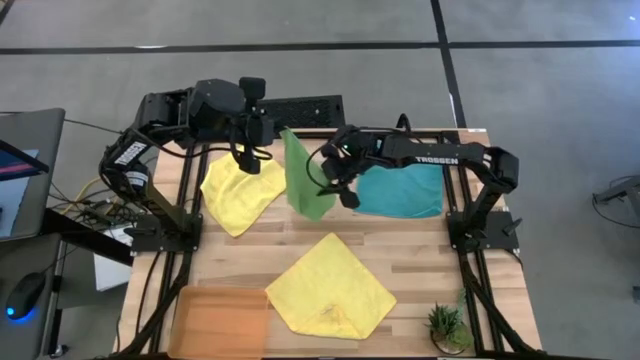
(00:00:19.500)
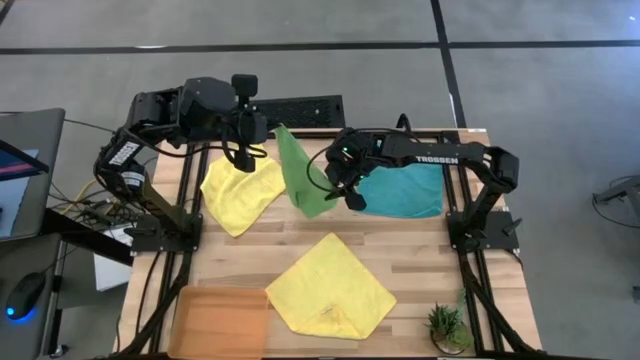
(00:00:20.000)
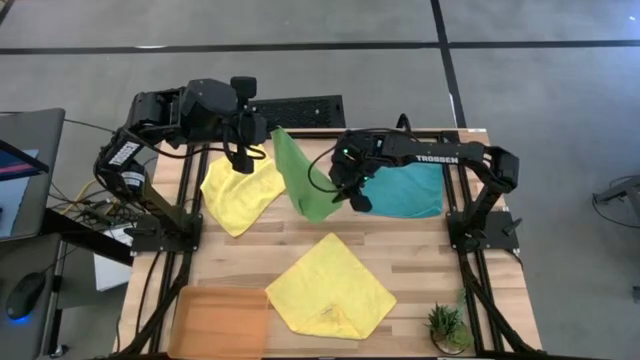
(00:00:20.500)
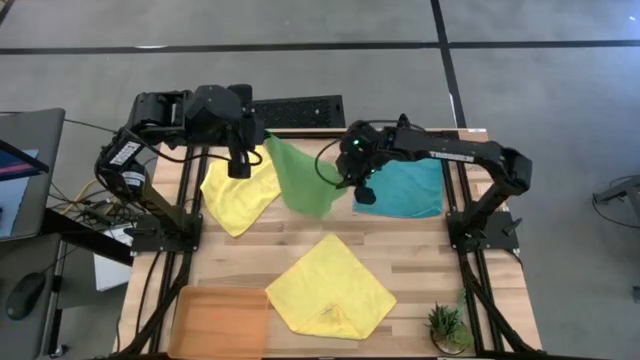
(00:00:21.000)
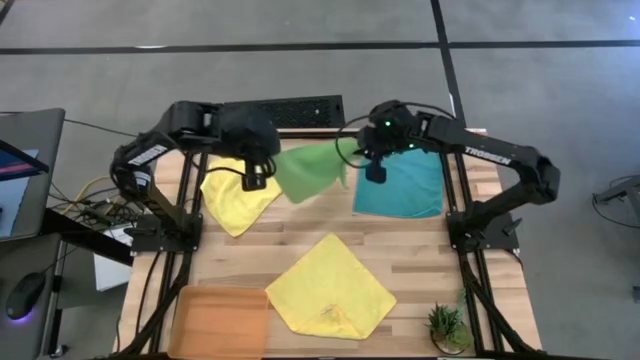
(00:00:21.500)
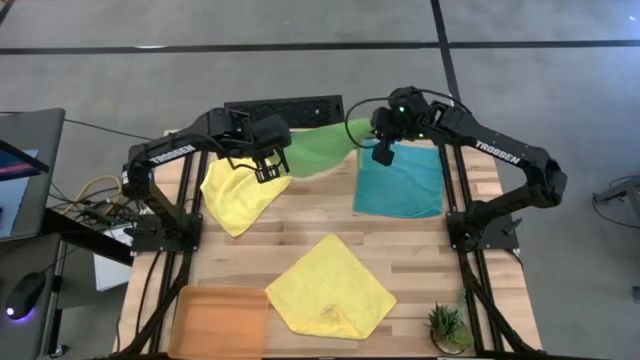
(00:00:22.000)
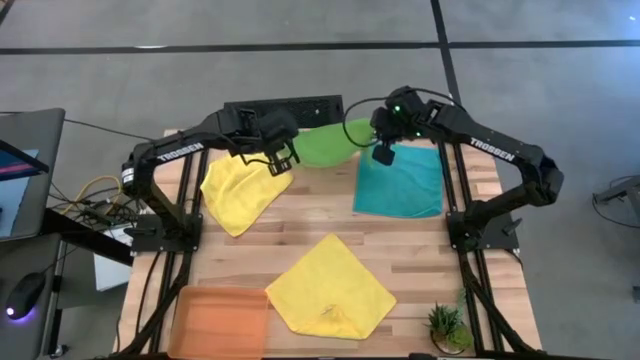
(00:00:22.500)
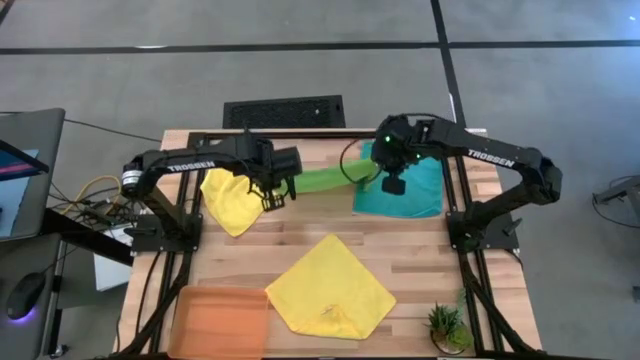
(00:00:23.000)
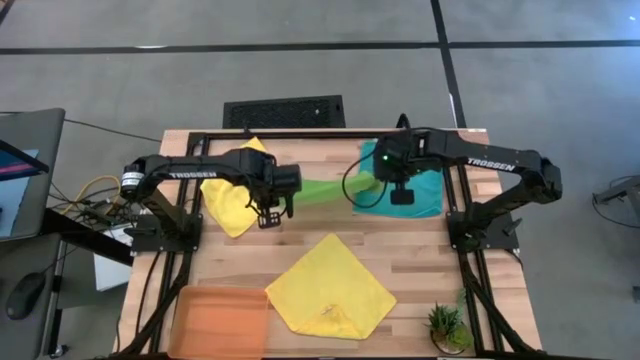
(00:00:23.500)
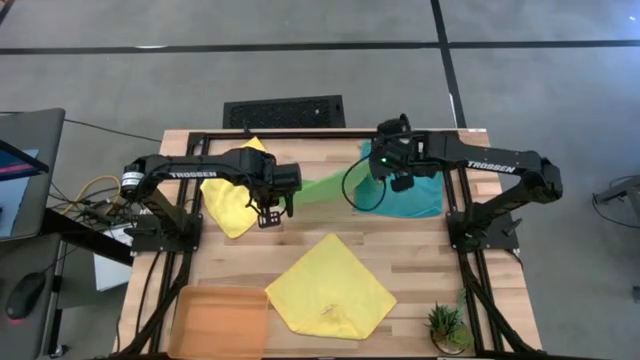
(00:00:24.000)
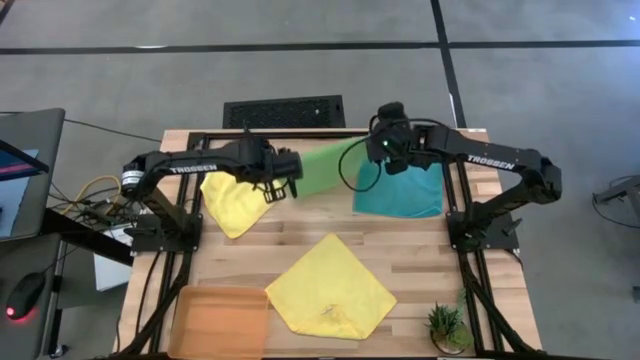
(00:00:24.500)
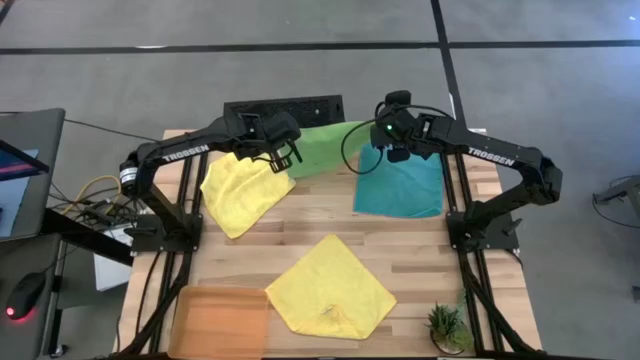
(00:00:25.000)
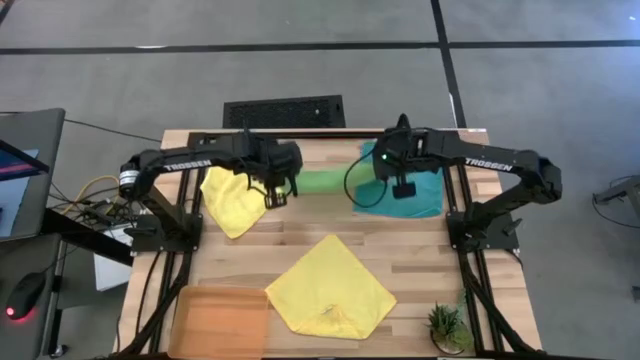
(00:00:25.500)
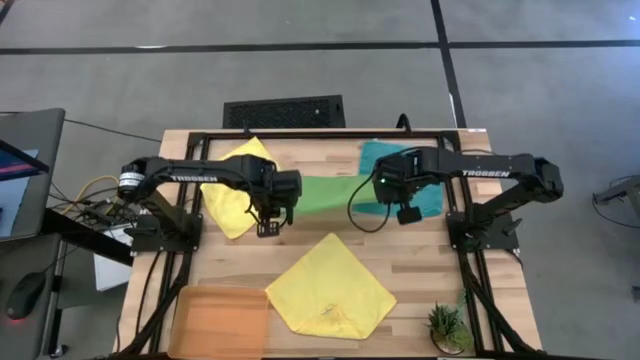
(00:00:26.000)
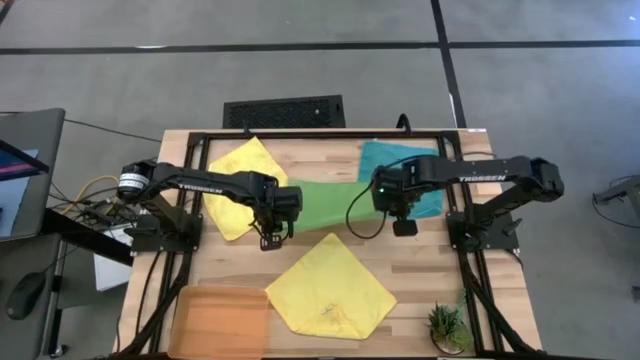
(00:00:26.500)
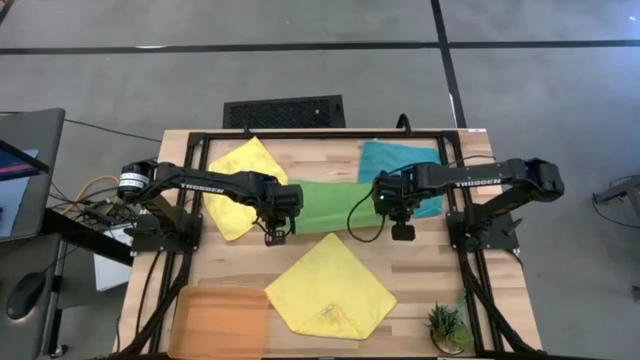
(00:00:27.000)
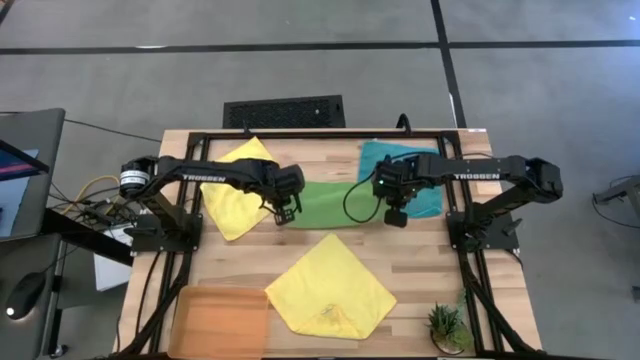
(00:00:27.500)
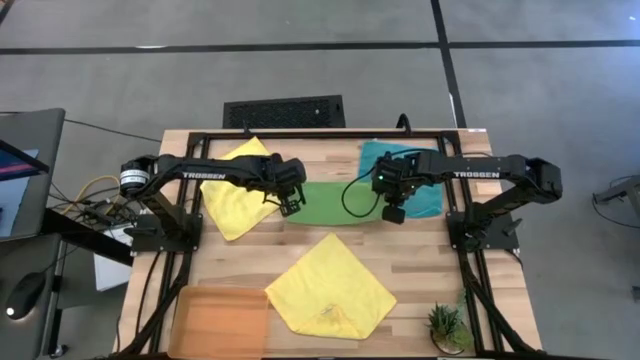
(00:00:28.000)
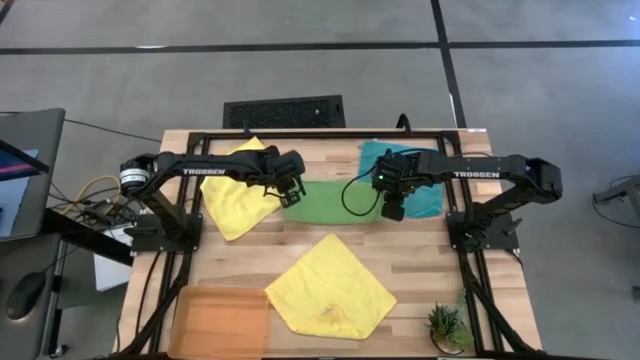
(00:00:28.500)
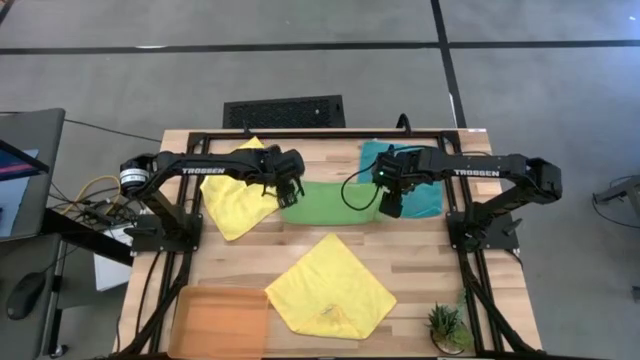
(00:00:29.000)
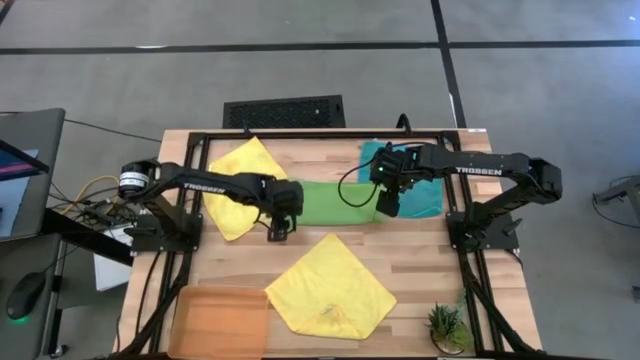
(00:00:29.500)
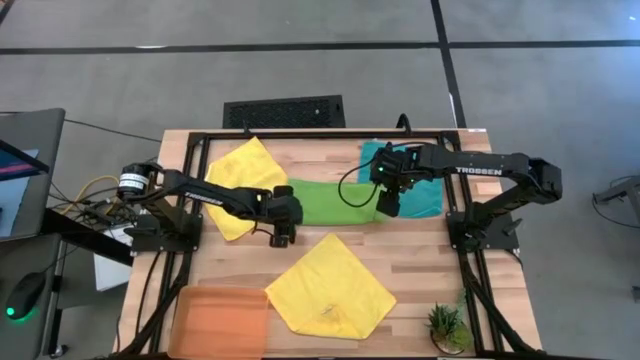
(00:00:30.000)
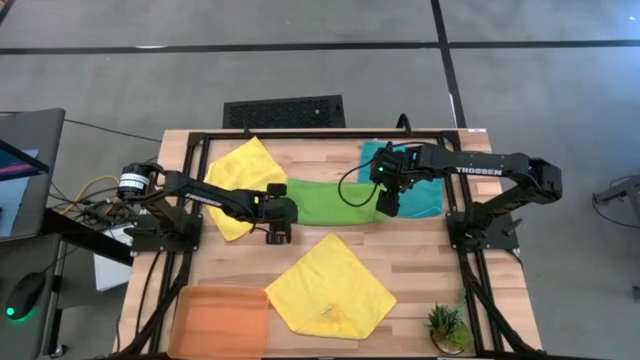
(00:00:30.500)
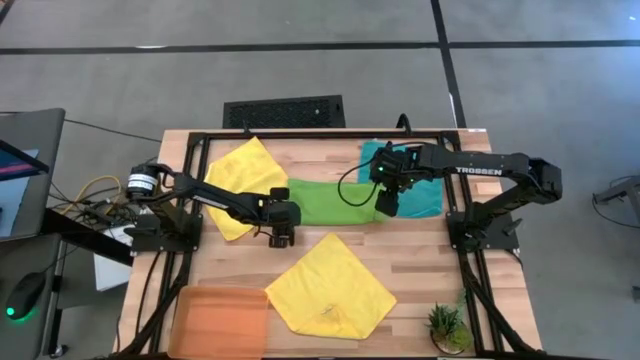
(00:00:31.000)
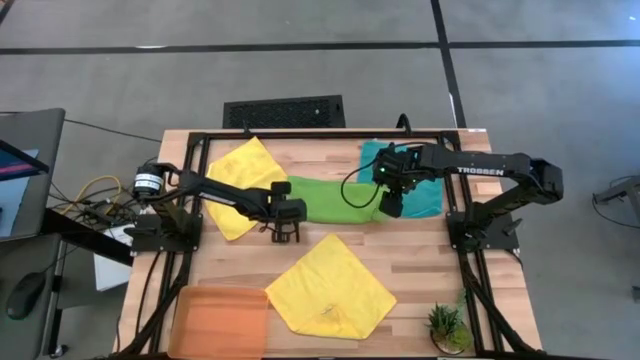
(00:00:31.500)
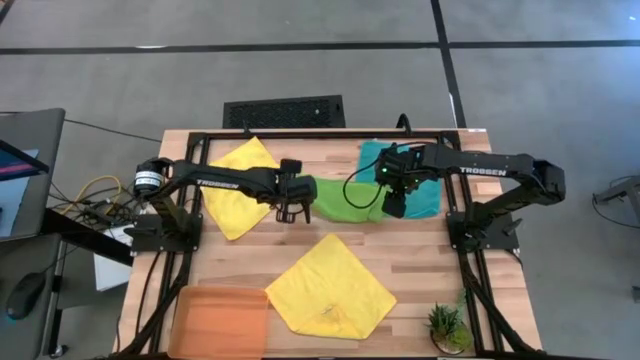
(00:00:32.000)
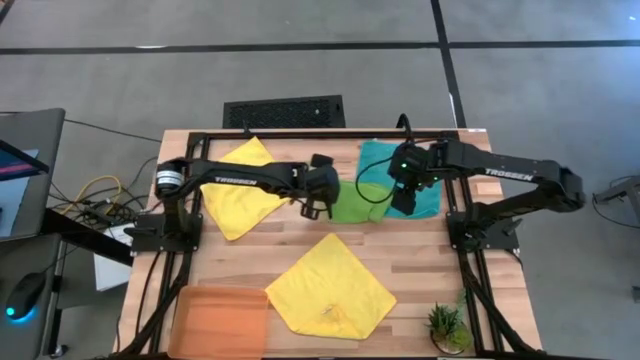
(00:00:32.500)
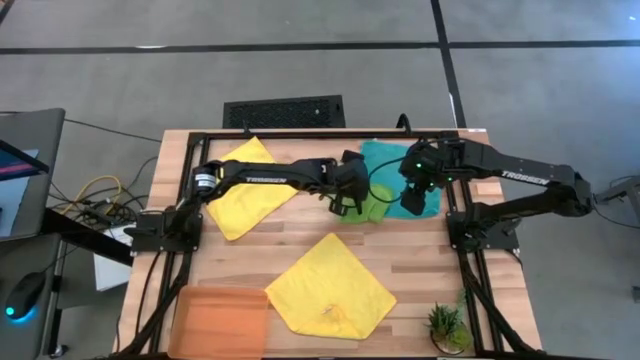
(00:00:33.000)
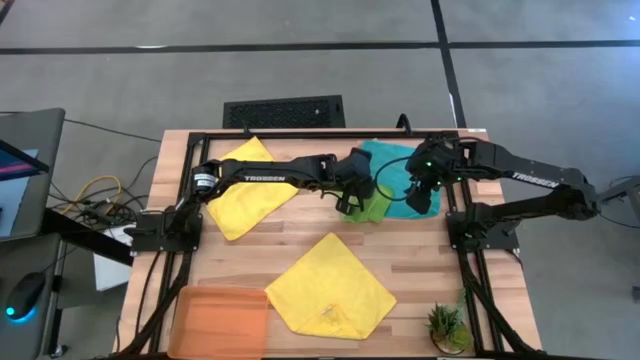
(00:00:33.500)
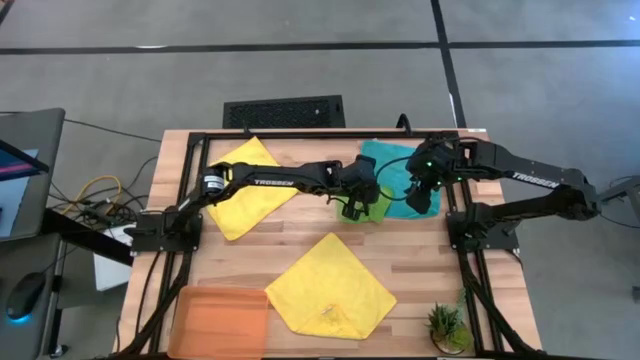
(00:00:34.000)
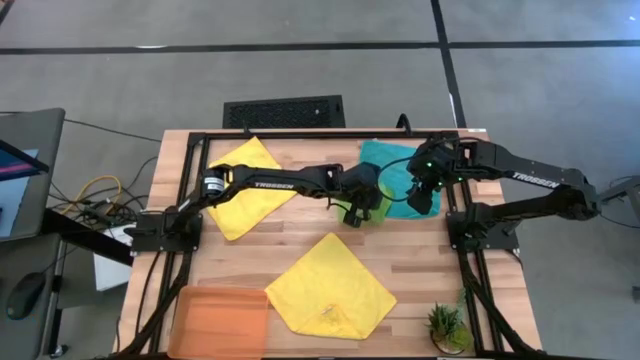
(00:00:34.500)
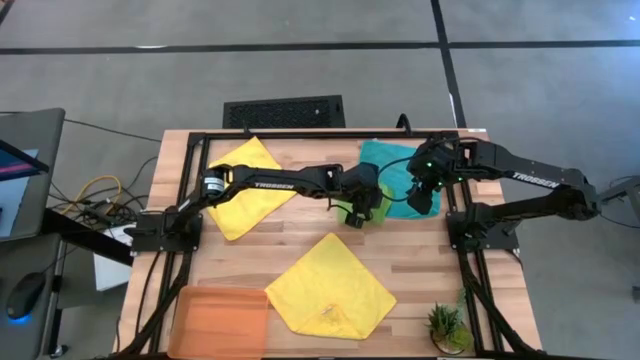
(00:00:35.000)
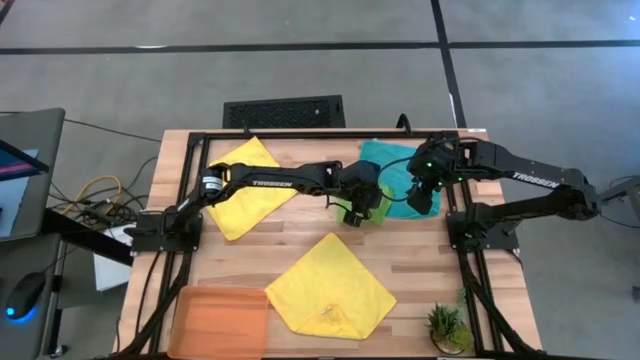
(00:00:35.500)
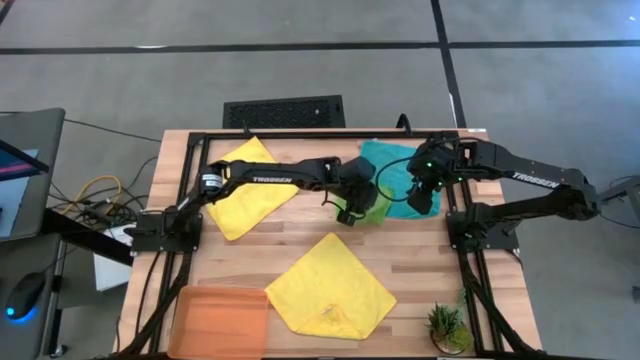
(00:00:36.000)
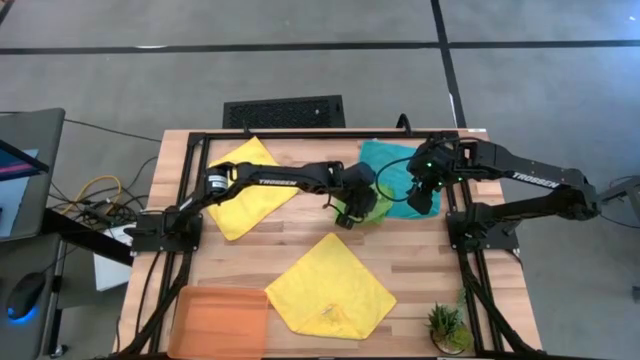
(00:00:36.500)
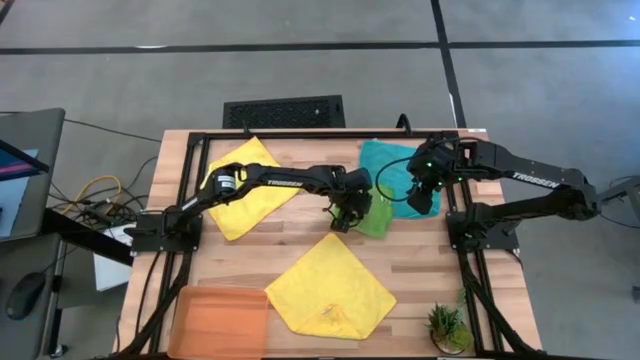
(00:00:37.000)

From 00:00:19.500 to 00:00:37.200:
Task: Fold microfiber towels
Fold the green microfiber towel

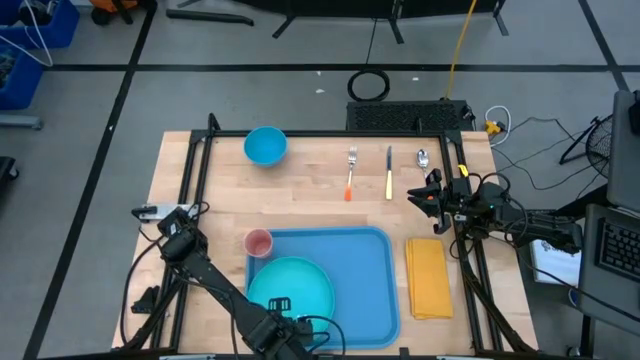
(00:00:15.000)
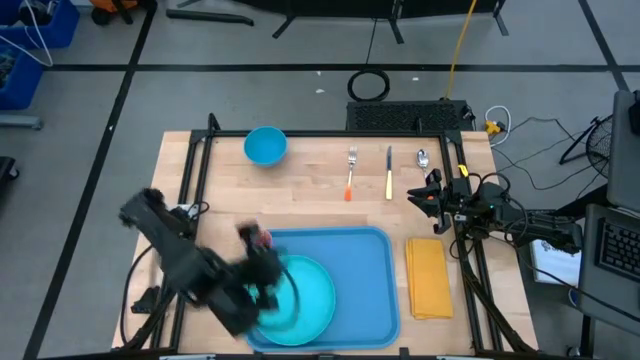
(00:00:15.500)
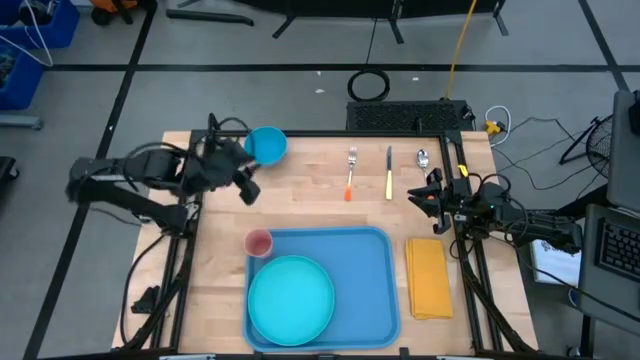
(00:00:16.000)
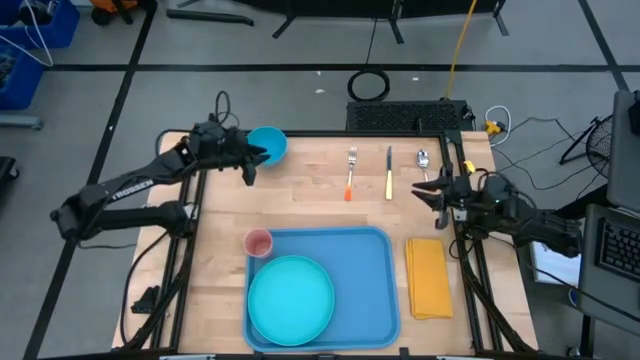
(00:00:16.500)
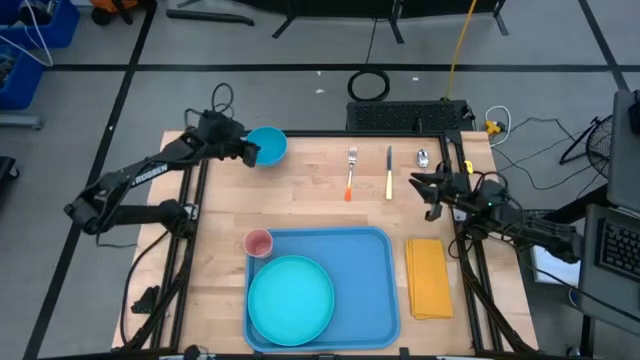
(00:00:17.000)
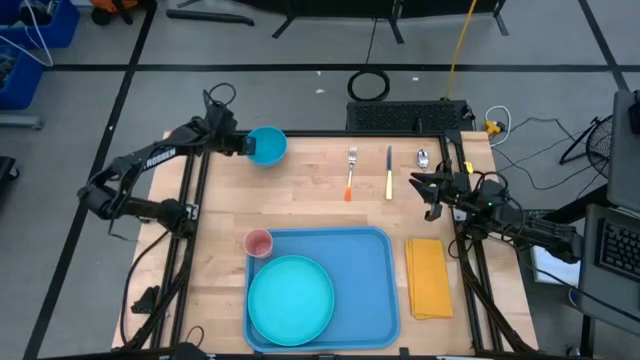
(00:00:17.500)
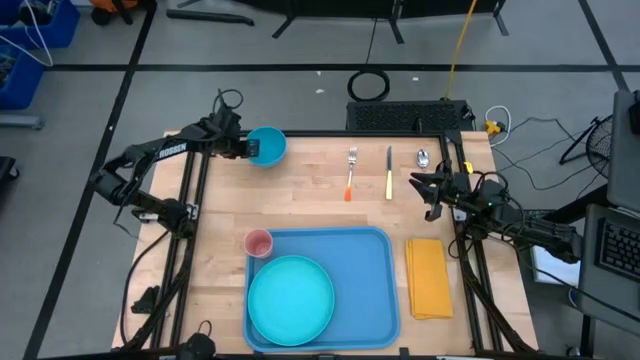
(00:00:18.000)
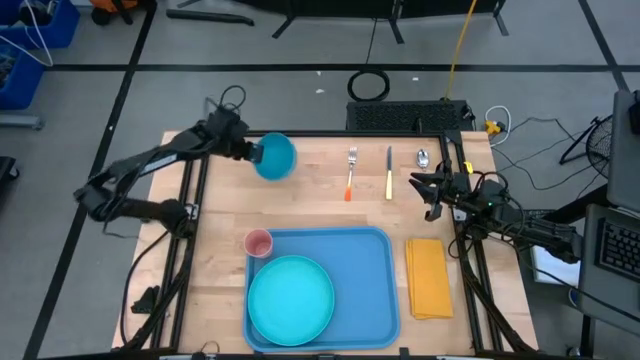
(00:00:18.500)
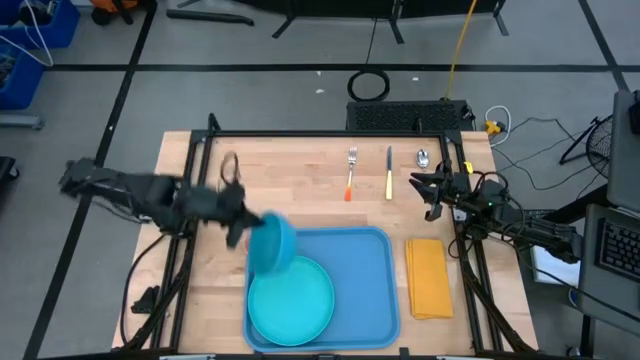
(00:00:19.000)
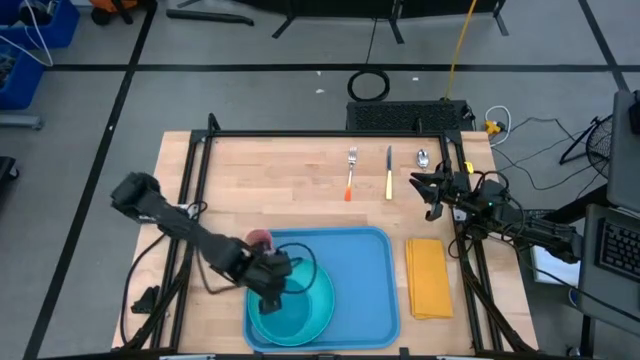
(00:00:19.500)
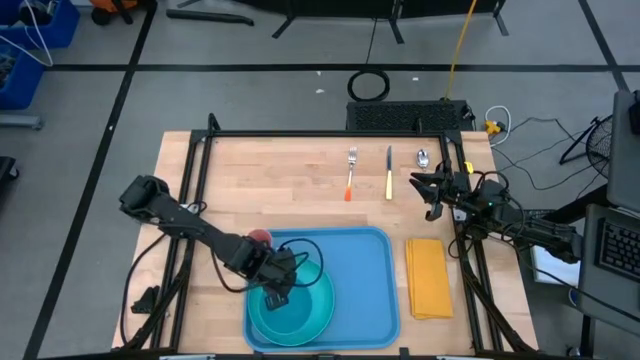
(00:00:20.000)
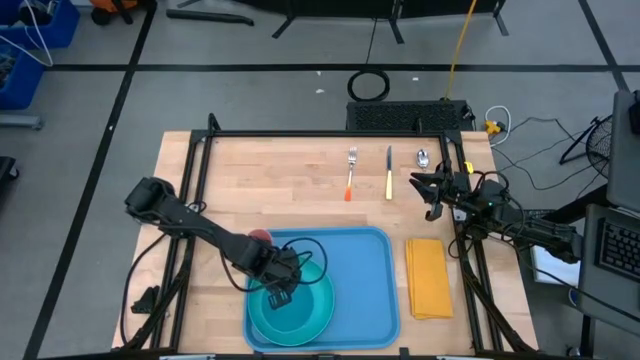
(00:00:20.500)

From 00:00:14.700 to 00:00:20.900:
Task: Set up tray
Put the blue bowl on the green plate
